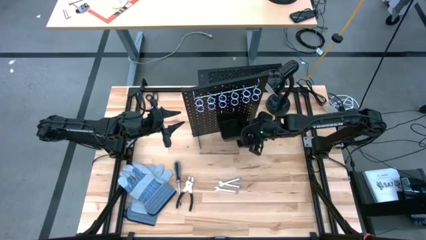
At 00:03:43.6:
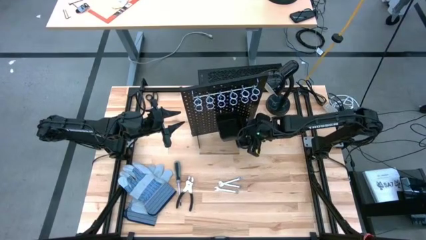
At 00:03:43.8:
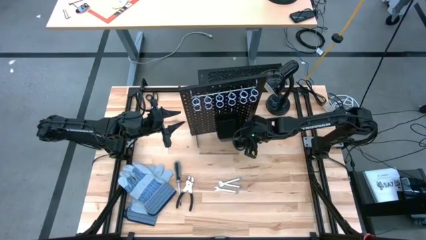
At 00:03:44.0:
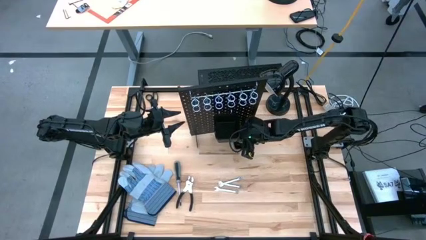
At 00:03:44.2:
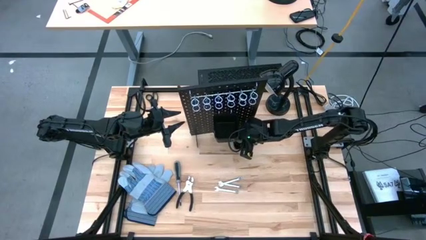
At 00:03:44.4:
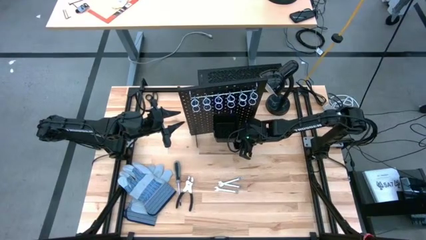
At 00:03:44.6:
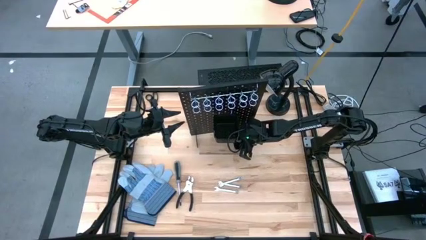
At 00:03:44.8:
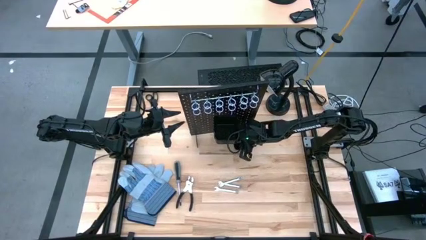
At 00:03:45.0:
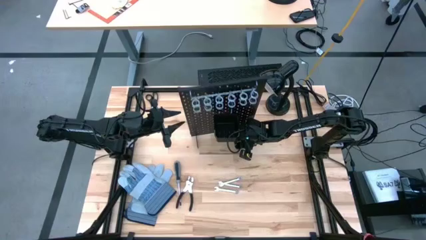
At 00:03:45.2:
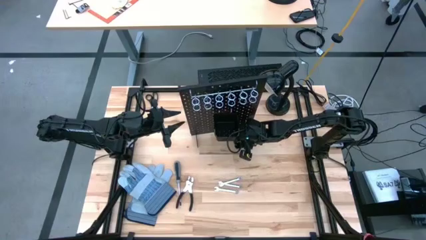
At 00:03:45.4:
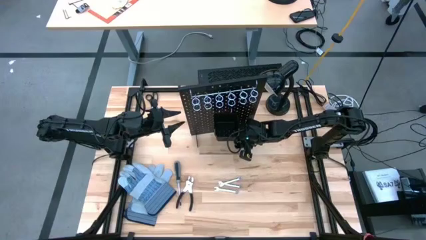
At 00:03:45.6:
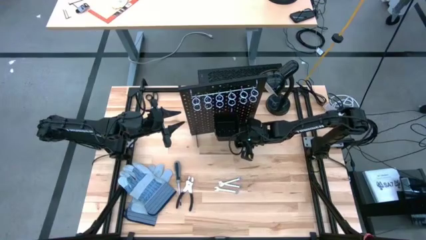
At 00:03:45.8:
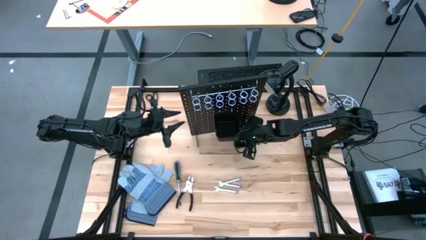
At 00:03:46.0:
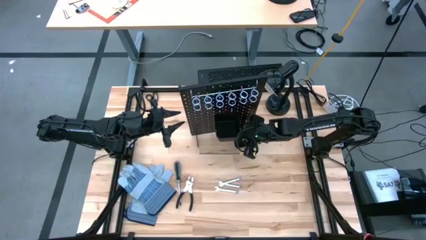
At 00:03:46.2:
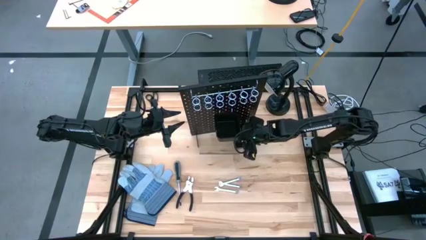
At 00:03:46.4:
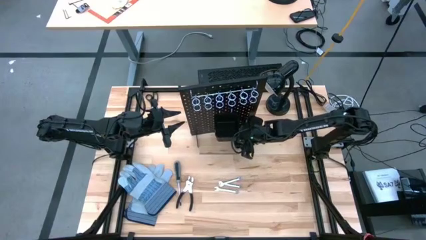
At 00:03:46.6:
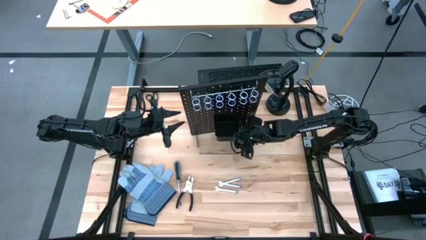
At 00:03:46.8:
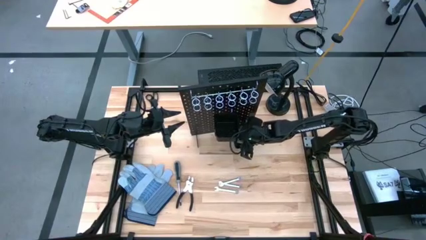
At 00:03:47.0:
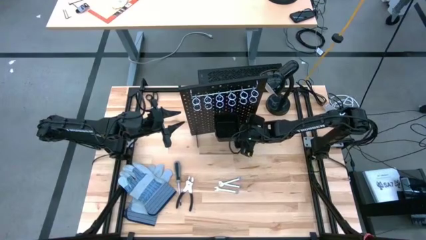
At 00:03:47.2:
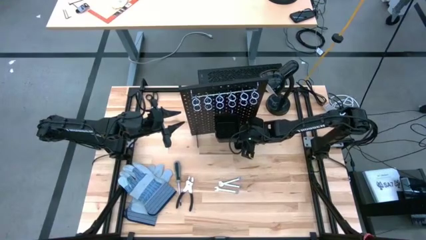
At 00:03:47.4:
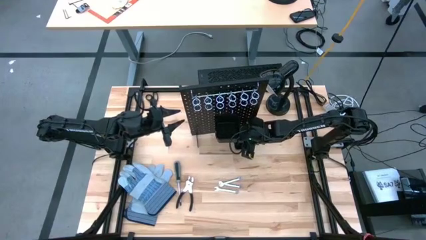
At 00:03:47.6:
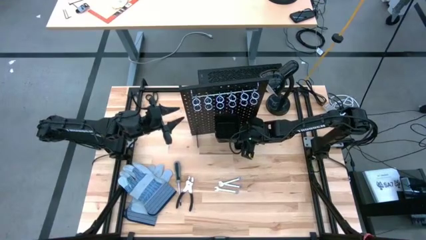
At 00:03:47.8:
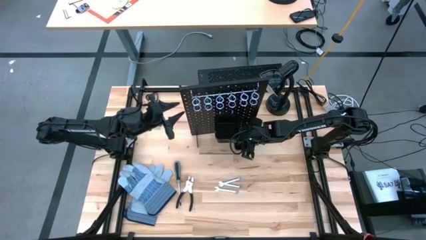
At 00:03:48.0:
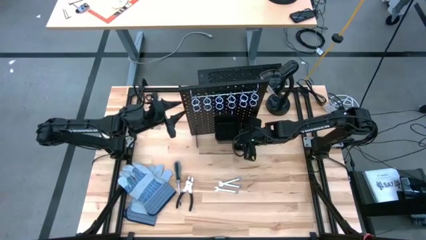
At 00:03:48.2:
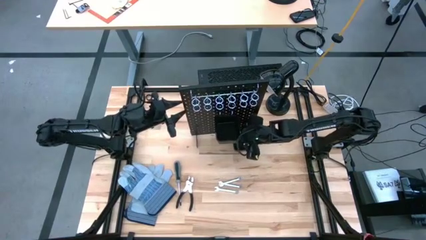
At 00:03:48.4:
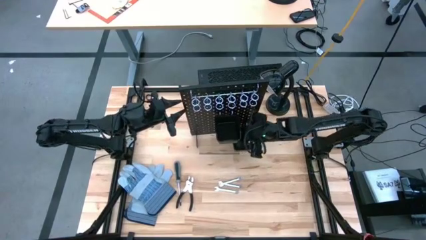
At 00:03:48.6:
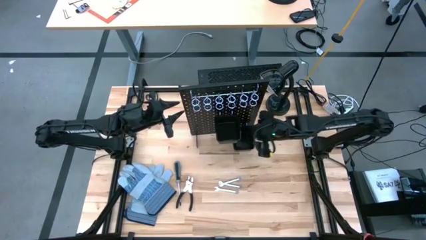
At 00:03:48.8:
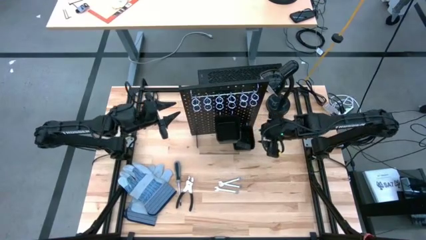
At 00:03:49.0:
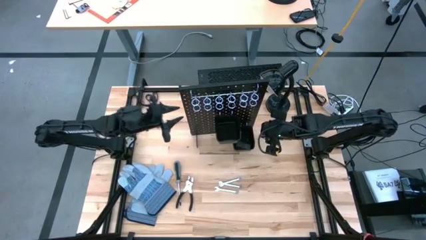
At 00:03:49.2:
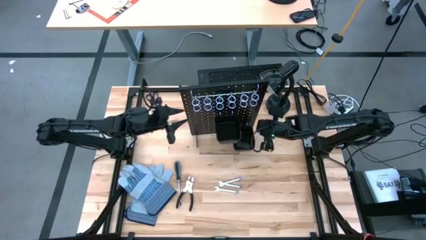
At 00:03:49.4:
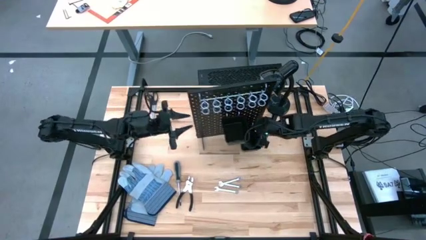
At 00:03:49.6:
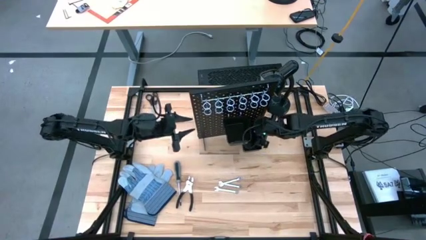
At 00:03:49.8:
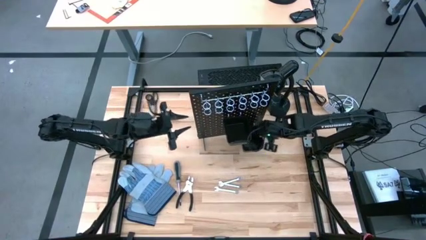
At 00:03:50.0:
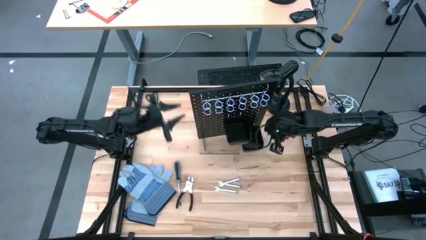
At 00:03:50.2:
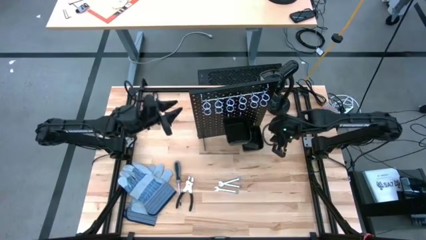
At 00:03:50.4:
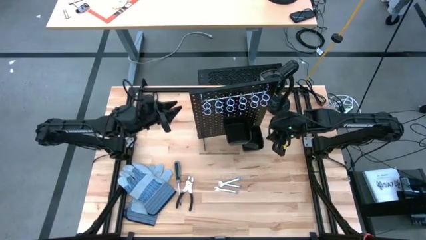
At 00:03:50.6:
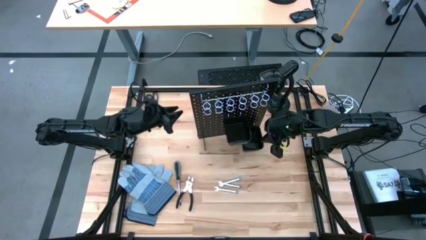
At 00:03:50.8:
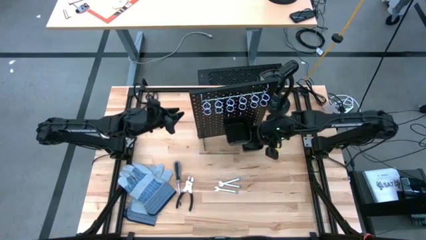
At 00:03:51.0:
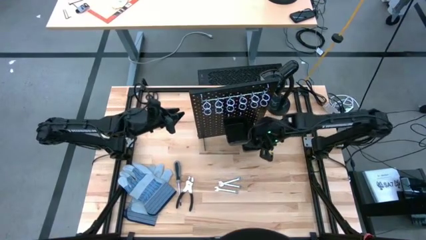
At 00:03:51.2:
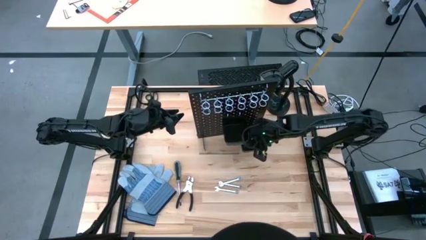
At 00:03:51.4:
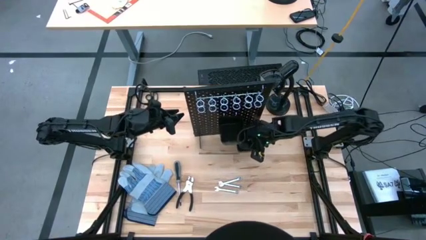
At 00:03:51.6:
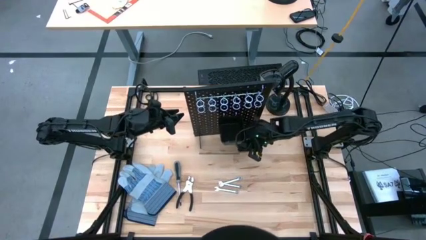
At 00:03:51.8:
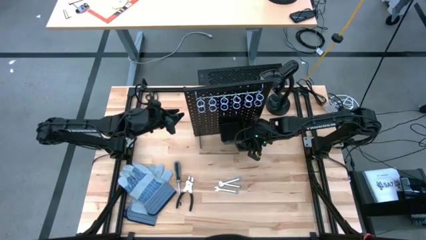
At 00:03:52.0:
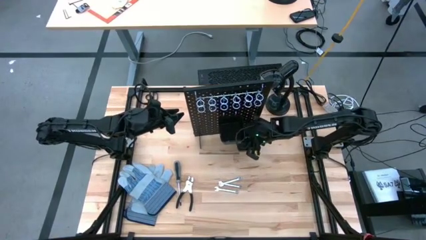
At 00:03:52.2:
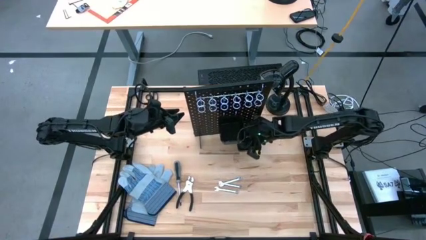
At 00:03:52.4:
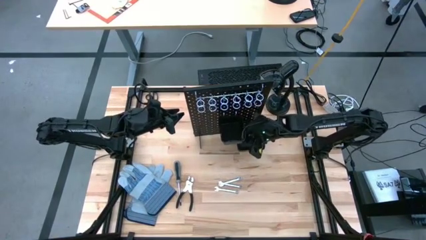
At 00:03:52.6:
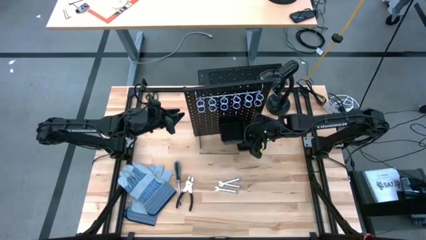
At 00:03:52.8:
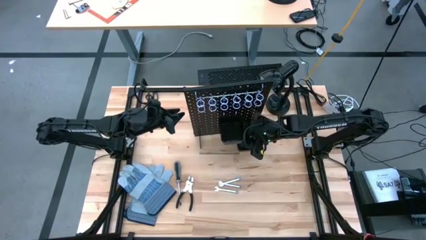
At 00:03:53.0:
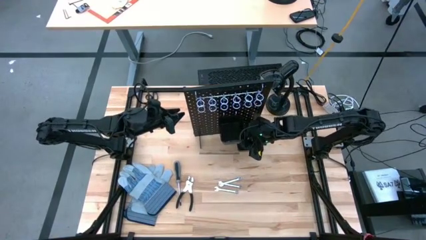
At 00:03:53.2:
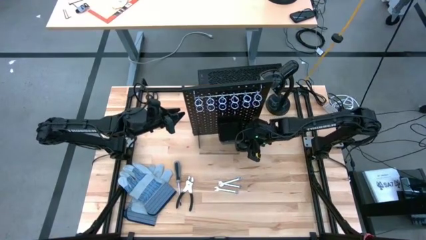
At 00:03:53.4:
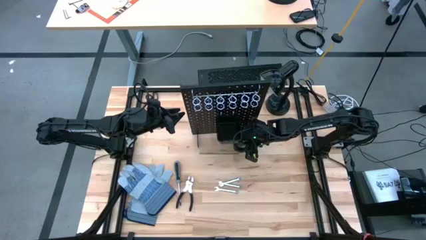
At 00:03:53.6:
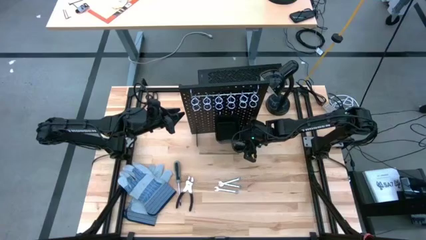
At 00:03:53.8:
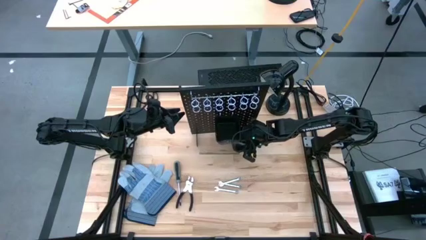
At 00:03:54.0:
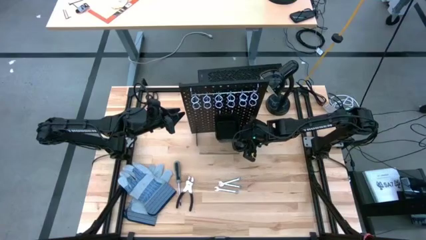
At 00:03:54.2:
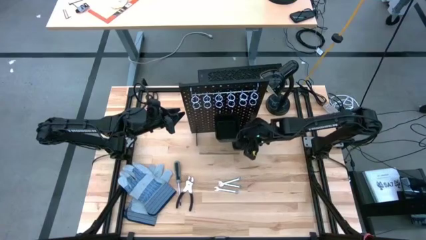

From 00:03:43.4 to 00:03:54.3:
Task: Hang tools onto peg board
Remove the black utility knife blades from the bottom black bin of the black pegboard

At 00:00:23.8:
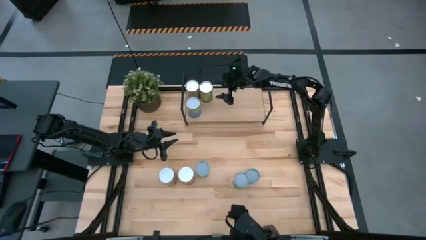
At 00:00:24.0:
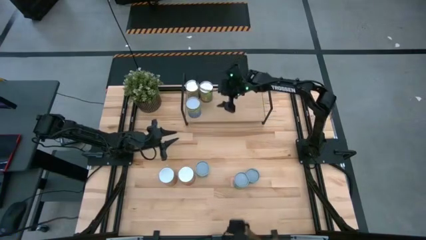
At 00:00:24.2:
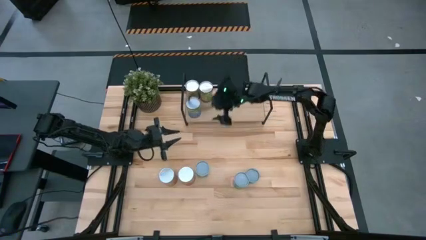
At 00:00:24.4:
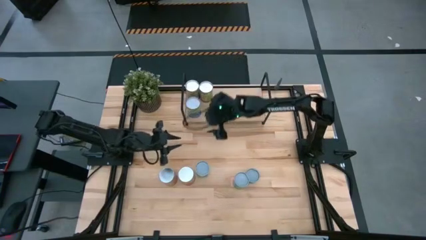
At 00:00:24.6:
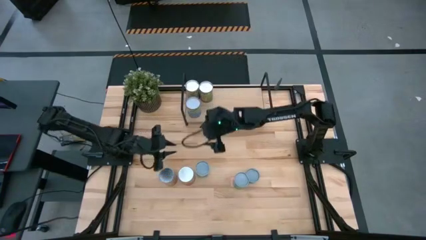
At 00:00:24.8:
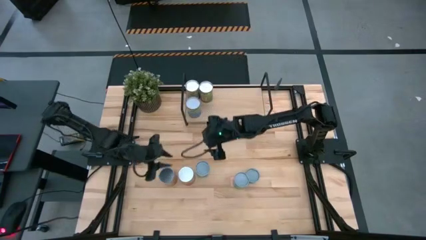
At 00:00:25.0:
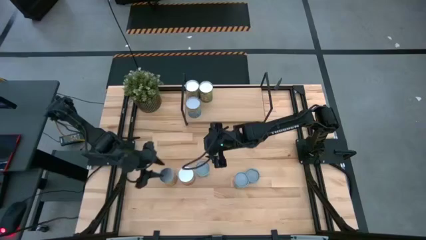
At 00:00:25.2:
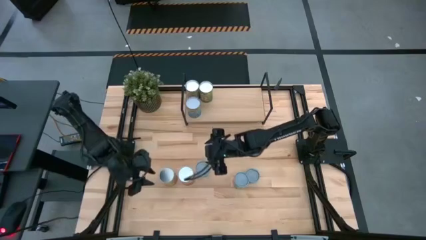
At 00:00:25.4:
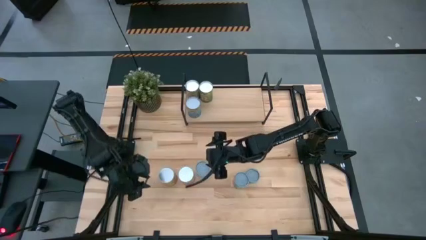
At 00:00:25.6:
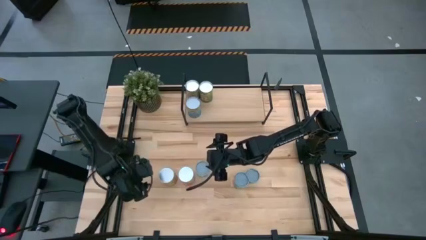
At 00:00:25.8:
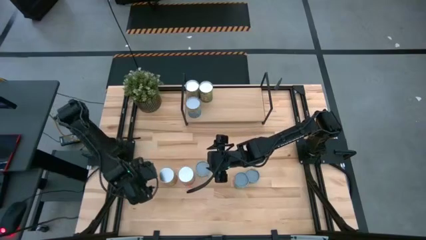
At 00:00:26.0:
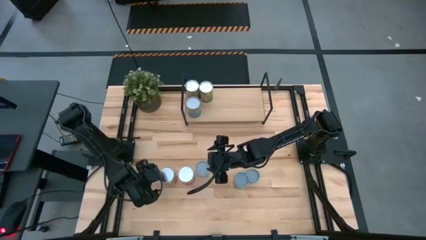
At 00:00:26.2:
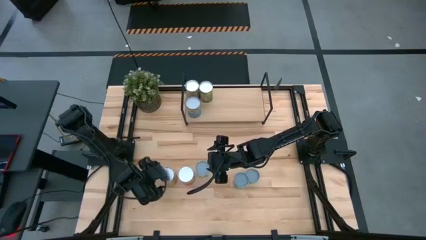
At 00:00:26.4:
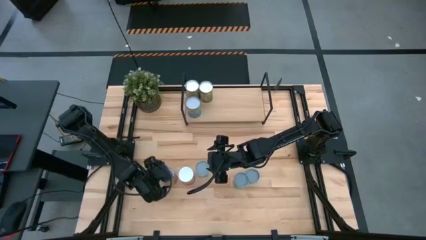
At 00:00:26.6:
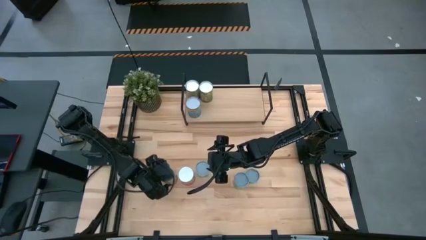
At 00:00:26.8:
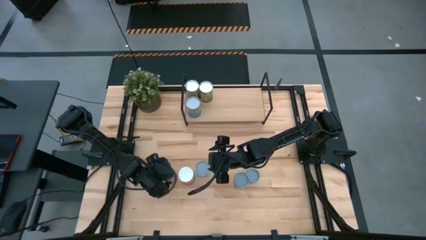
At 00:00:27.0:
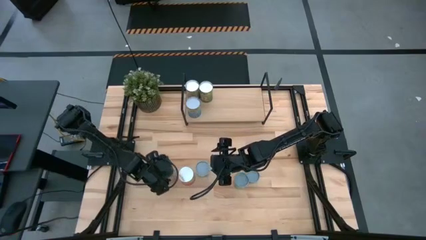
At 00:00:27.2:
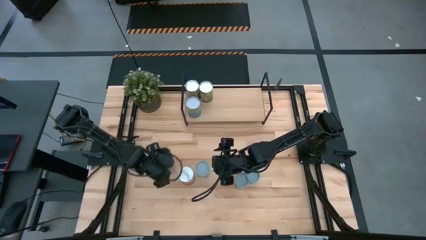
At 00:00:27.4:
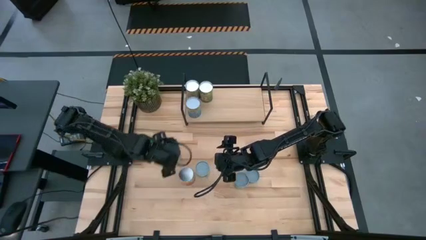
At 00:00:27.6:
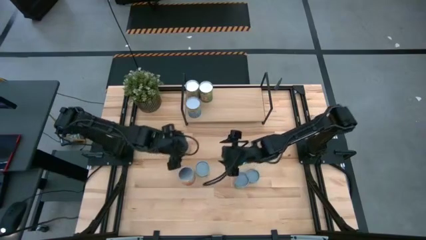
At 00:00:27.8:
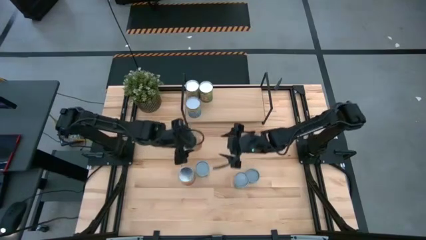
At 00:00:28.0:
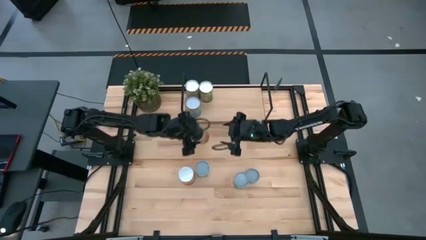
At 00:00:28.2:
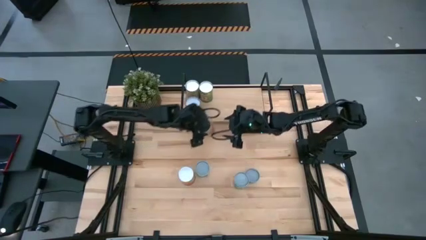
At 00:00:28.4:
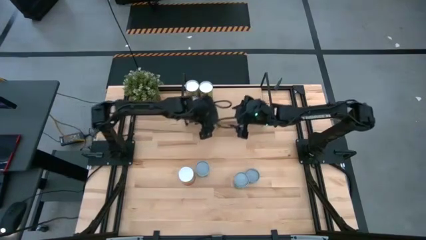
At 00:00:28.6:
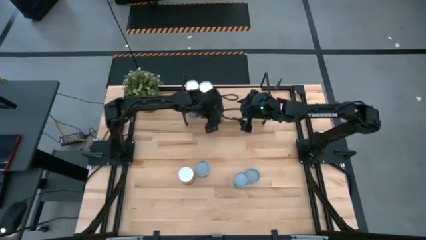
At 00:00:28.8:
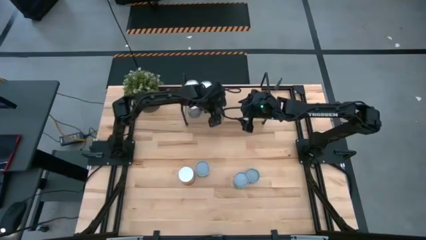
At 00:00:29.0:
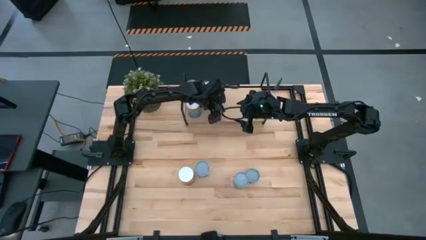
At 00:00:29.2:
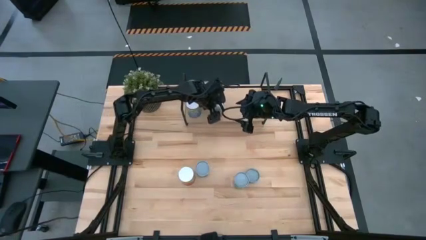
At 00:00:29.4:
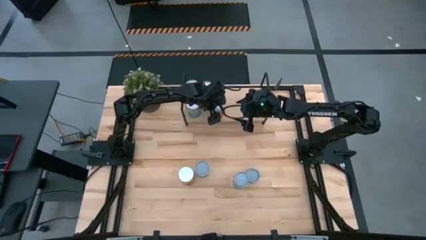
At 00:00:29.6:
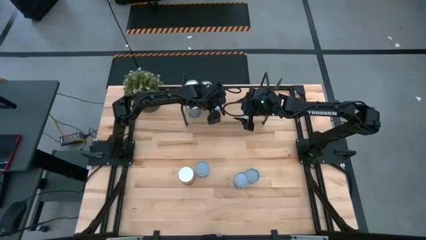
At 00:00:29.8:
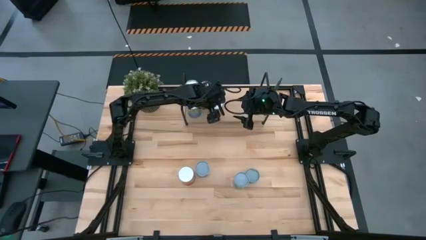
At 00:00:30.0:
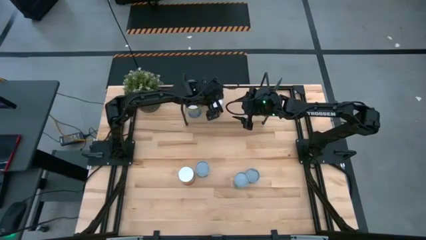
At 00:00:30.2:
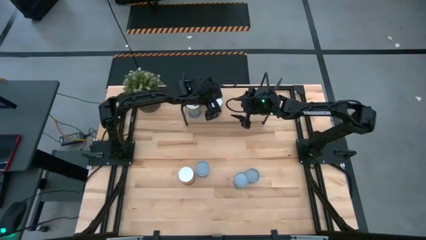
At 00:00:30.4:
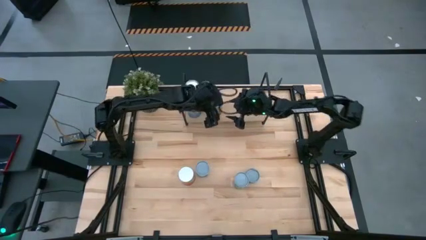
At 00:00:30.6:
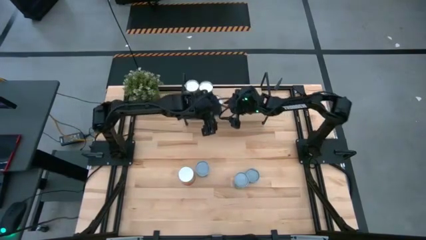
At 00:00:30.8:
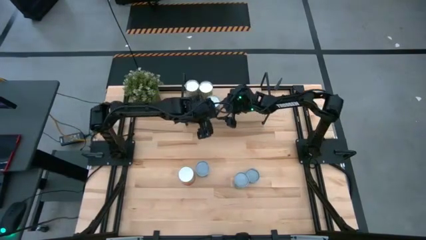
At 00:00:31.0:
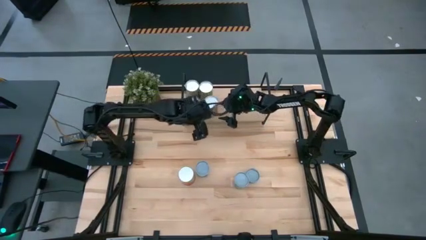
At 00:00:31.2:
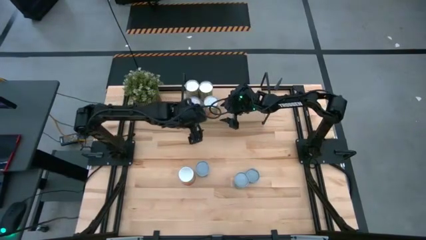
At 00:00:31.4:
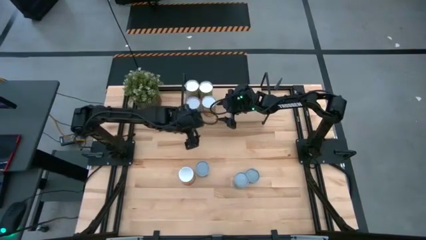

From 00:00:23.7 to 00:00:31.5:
Task: Pick and place cans onto a shelf
Put the left orange can on the shelf
